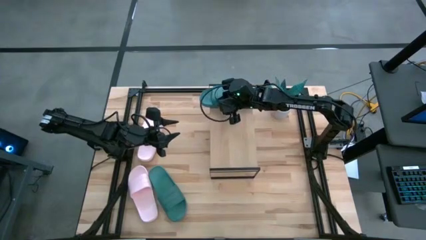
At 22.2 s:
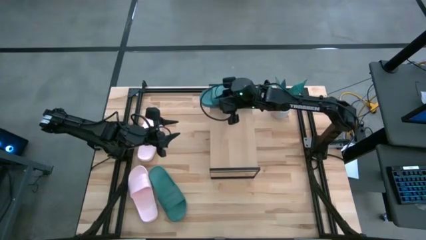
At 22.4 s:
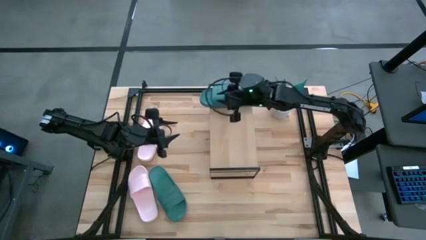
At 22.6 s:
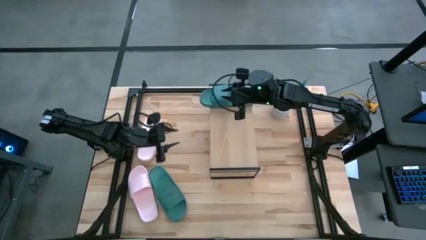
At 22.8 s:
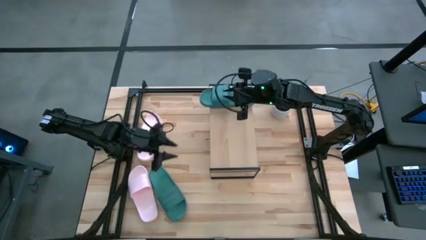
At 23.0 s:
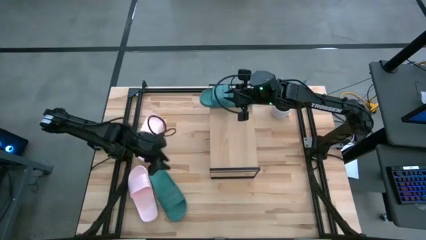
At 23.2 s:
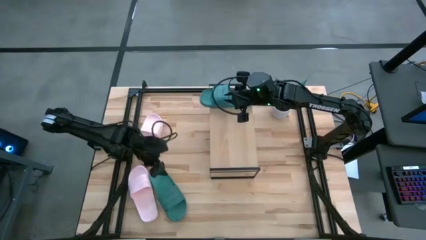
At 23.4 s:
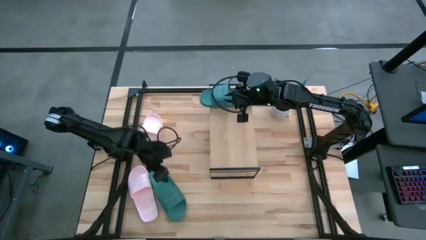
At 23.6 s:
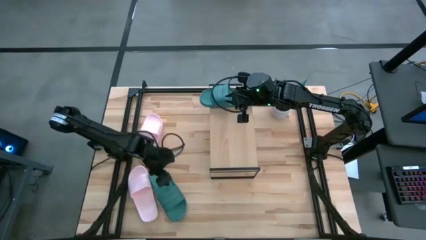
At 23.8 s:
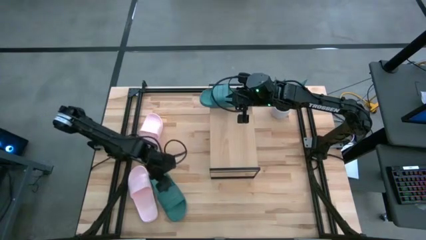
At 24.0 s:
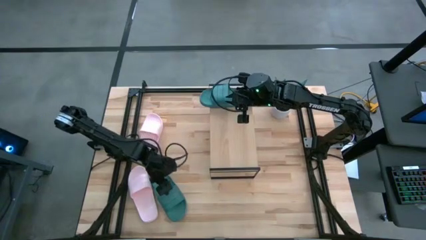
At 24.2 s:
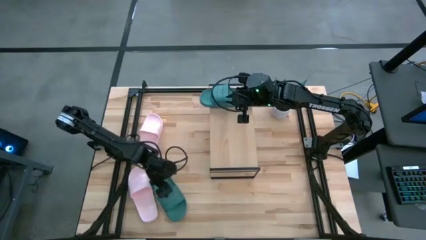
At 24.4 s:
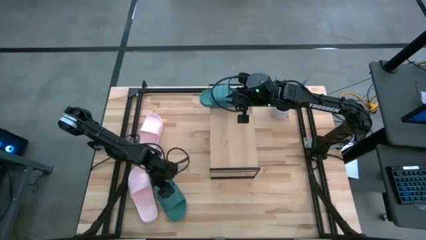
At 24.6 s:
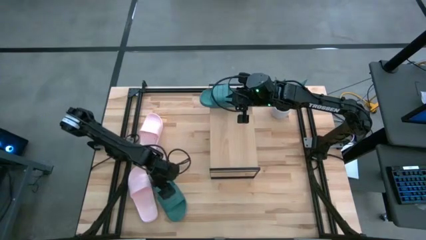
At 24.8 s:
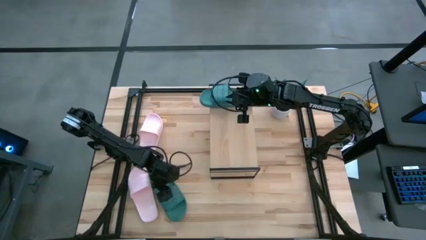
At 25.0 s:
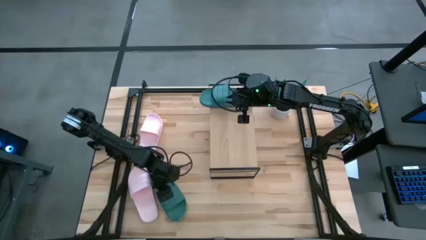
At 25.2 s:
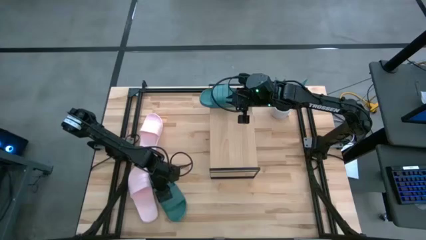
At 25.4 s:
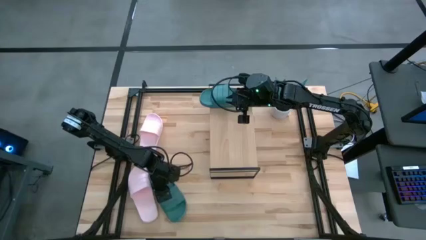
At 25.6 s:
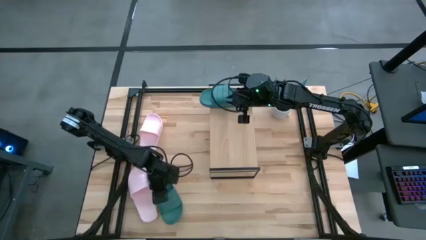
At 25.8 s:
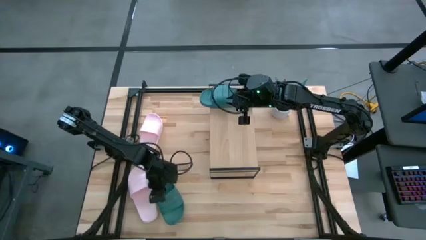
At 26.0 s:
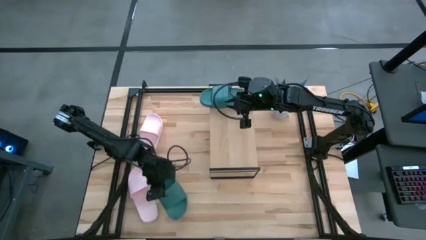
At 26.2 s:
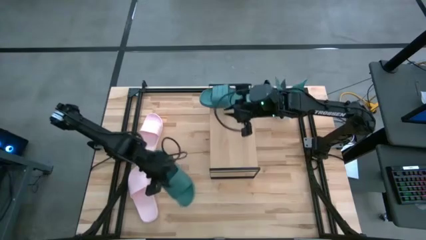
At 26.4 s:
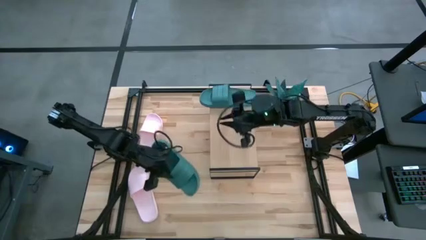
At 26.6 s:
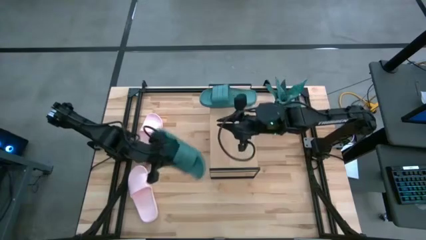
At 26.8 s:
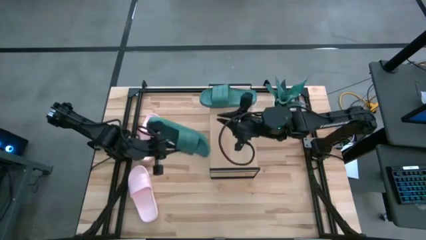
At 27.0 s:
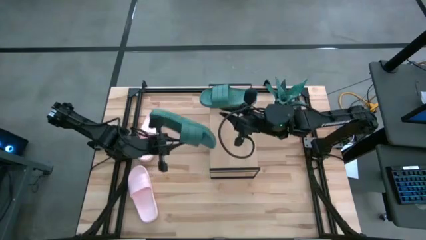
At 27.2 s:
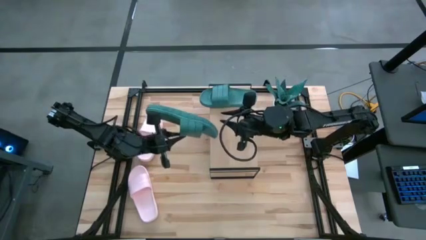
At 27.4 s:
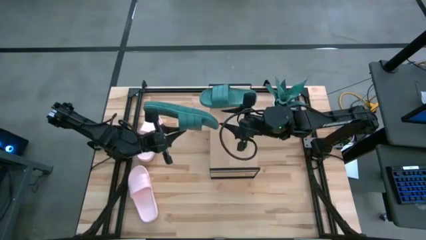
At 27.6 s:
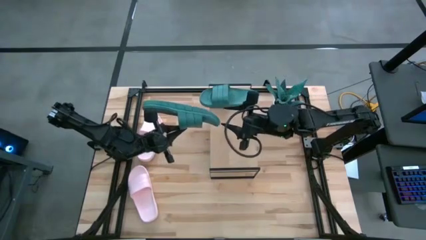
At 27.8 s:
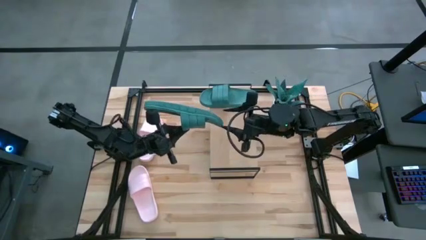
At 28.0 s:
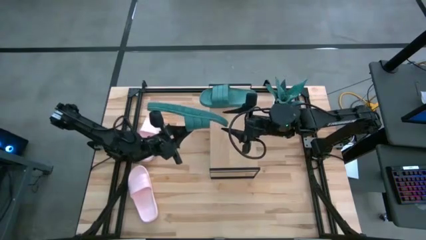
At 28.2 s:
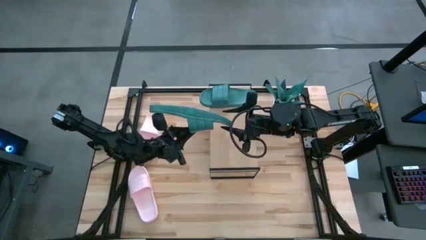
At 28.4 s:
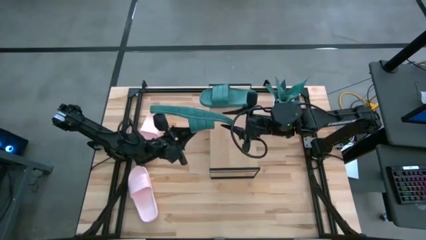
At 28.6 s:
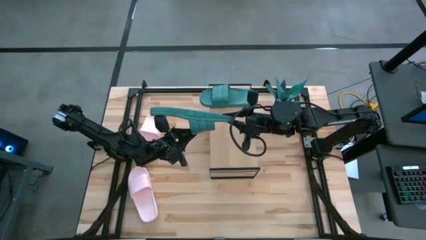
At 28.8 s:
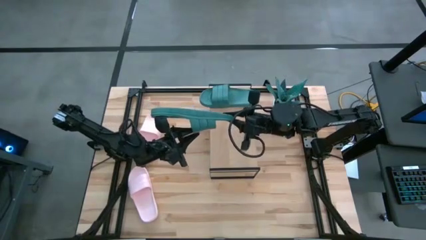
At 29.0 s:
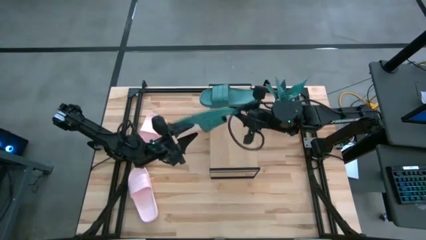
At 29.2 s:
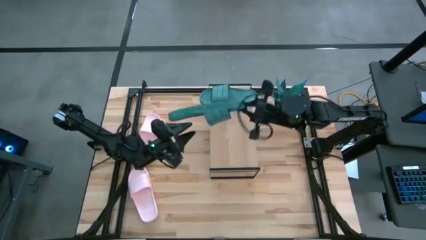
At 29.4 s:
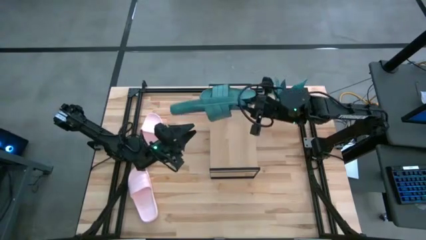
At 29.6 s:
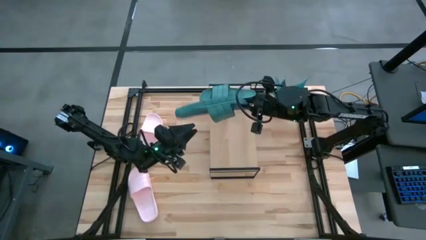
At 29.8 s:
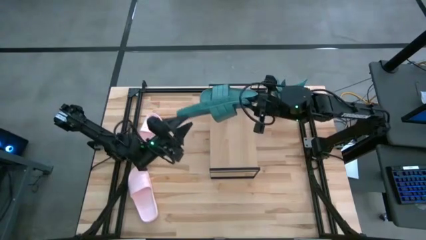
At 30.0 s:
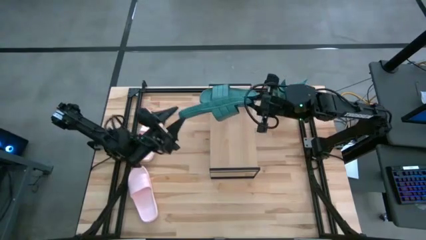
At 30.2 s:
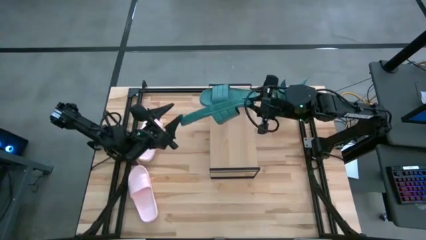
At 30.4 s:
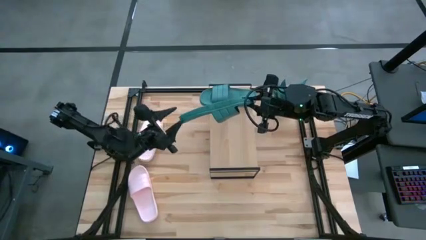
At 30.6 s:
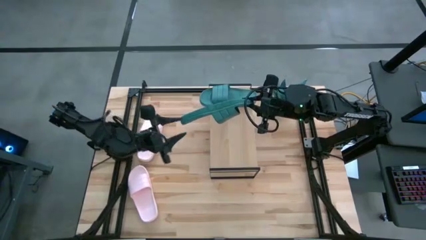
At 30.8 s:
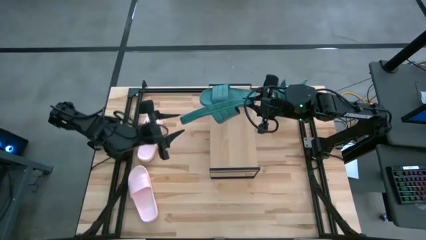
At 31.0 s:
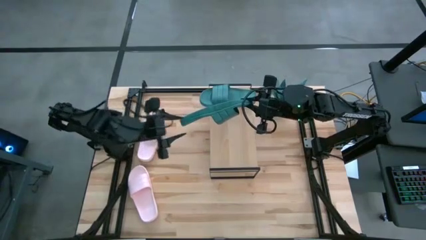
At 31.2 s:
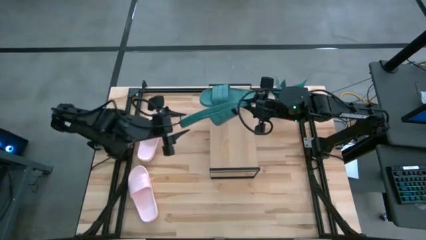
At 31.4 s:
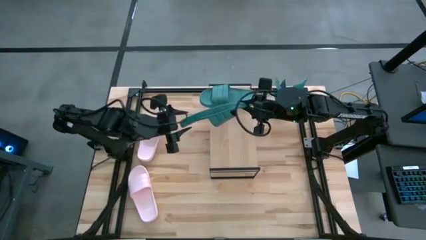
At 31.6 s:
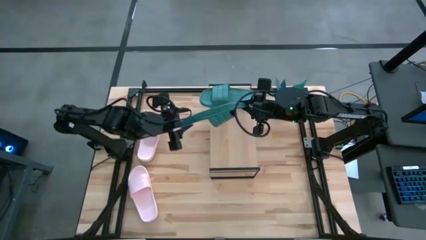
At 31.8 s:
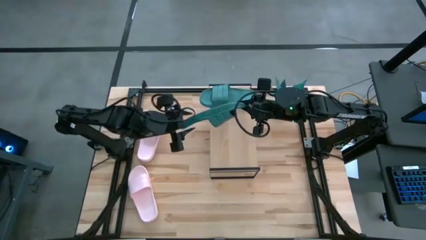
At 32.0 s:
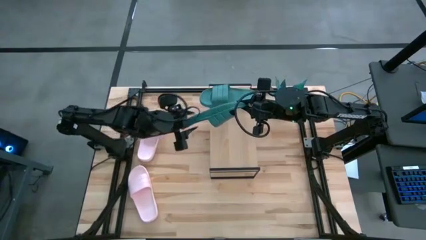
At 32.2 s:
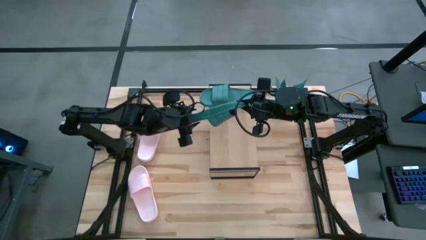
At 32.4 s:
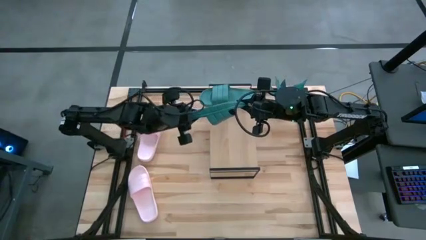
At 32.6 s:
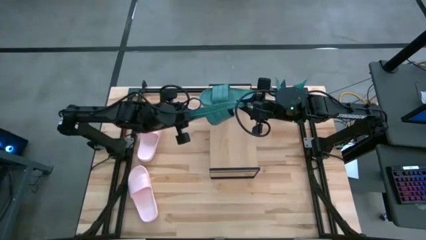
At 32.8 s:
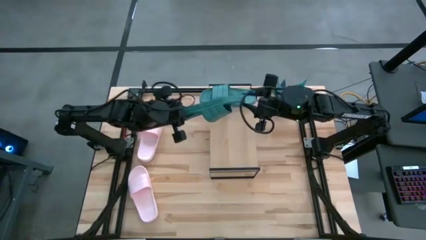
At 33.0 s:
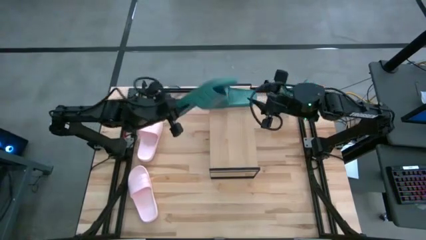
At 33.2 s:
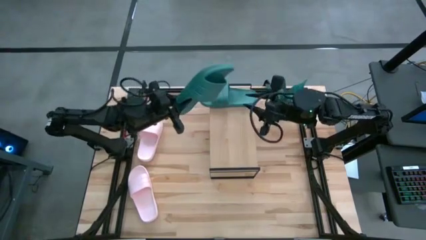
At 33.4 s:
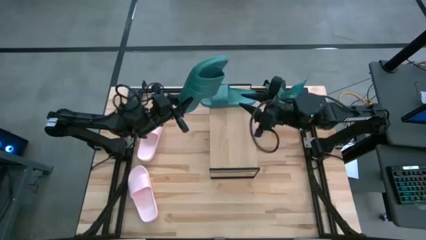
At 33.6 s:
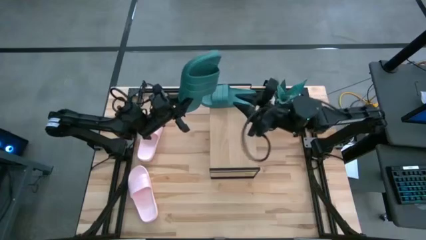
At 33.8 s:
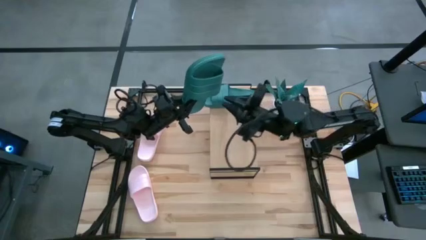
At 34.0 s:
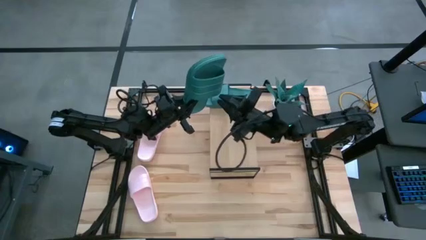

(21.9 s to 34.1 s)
Task: Pick and place slides into the shelf
Put the left green slipper on the shelf

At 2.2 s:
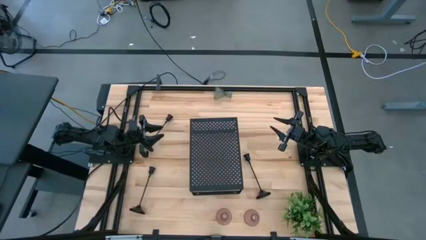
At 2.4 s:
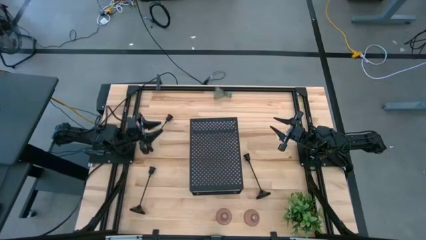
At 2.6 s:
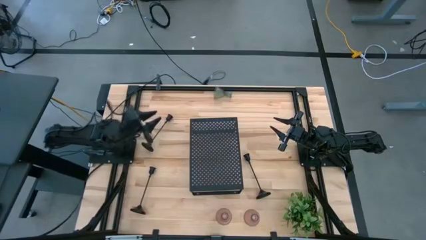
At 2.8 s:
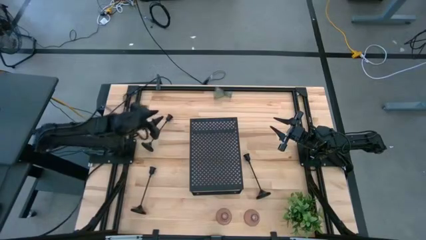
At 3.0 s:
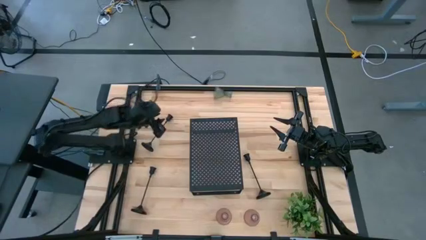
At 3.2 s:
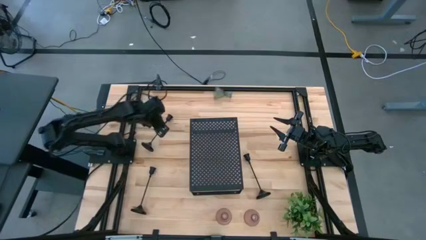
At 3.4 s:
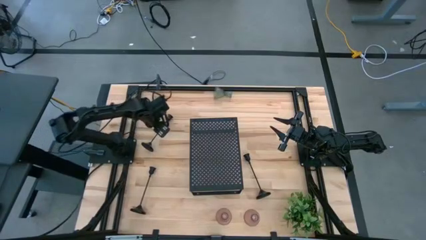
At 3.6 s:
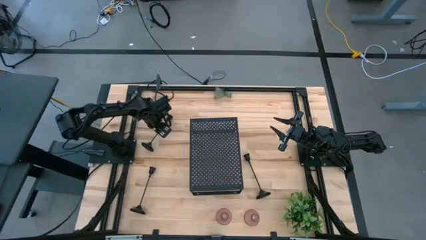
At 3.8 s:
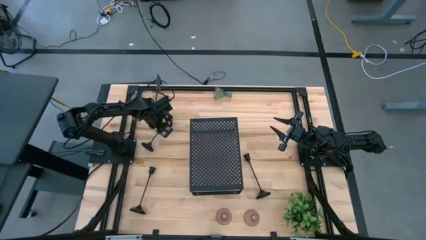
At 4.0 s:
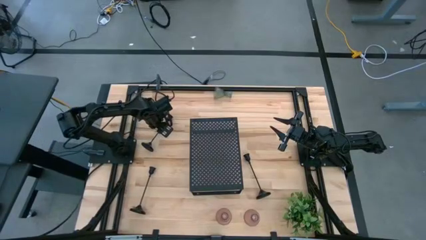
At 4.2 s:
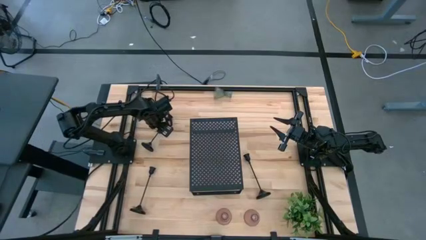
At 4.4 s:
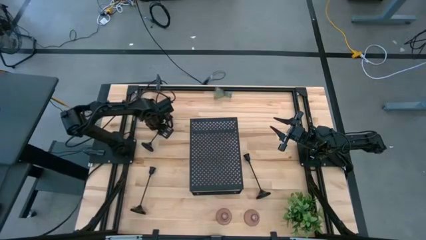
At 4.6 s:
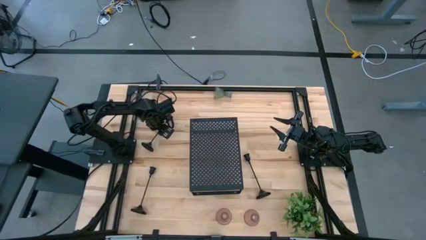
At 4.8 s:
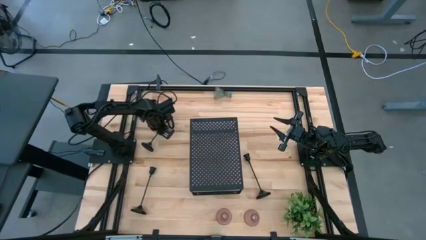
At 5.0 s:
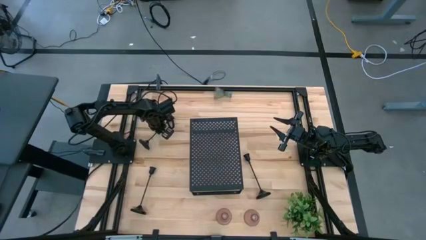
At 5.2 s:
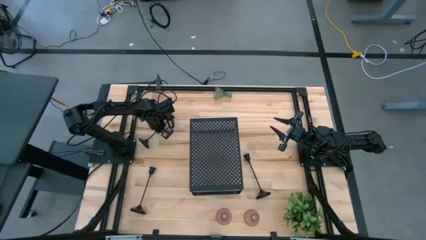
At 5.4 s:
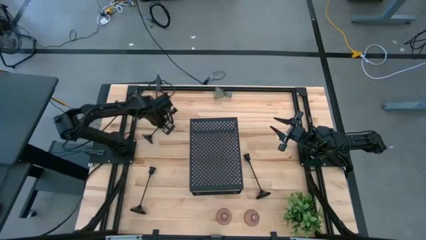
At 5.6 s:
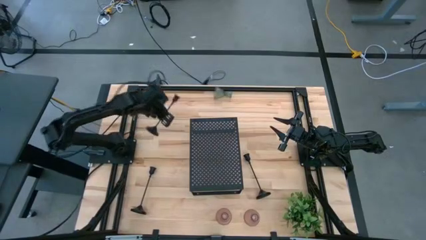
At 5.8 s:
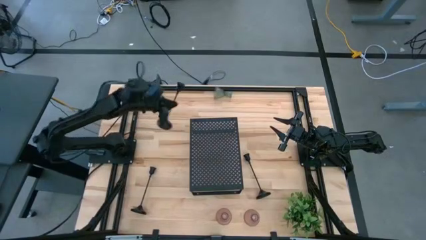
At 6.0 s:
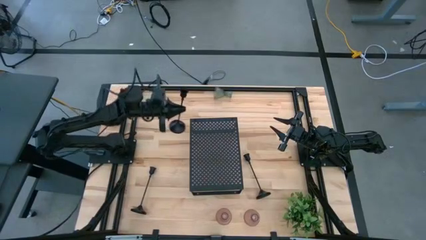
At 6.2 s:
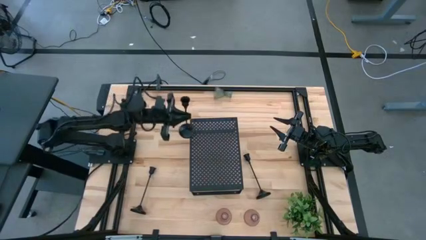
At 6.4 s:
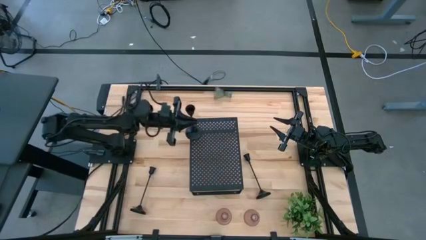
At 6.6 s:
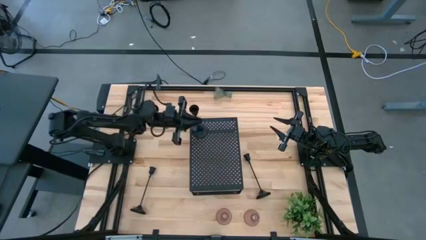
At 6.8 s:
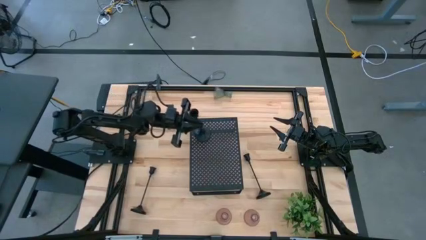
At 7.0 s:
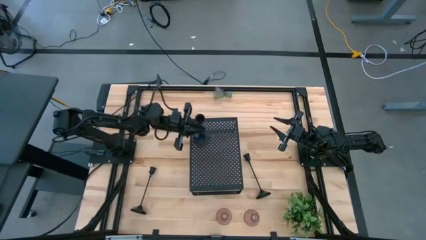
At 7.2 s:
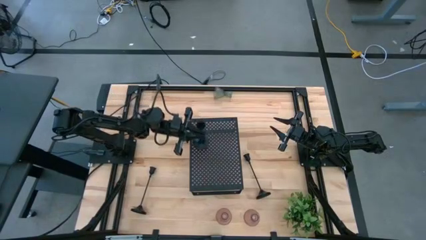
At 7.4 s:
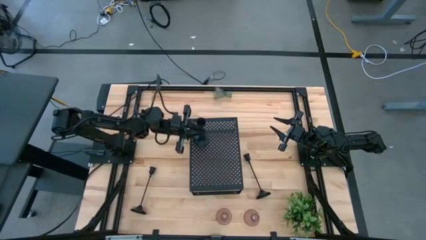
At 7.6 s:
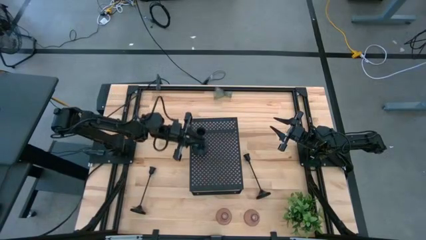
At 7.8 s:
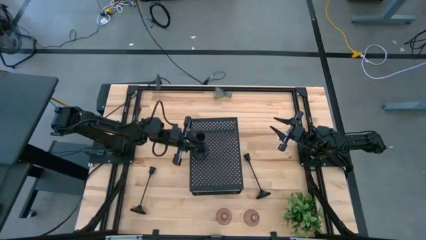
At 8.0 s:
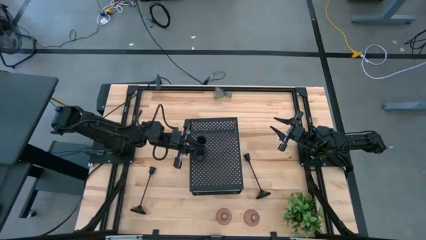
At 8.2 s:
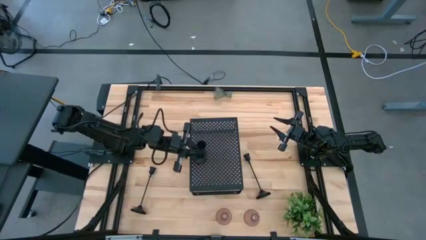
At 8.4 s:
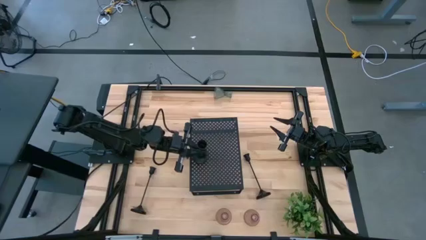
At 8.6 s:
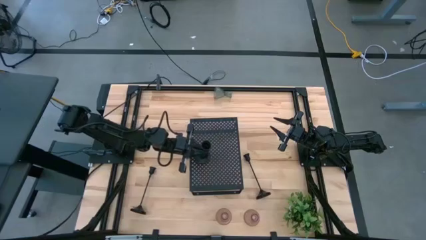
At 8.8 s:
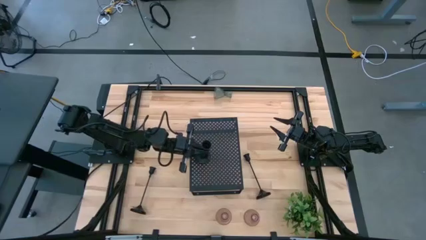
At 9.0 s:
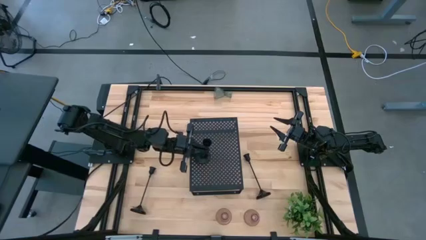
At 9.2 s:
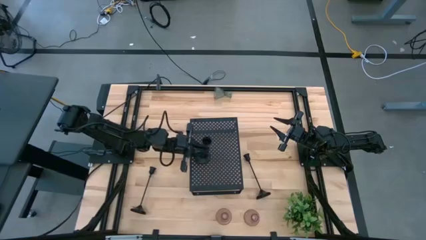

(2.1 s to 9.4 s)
Task: Pick & Place candle stick holders
Put the top black candle holder on the shelf
